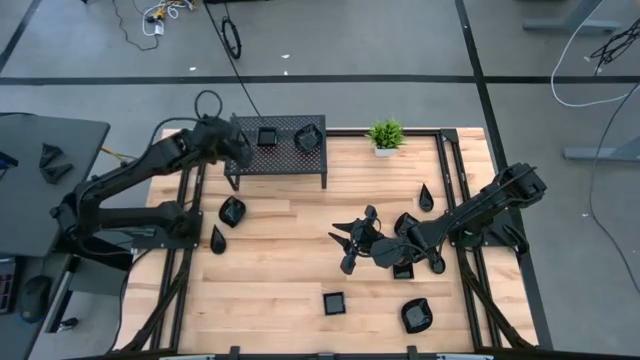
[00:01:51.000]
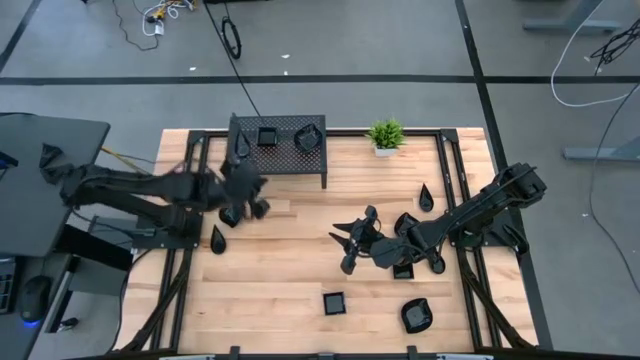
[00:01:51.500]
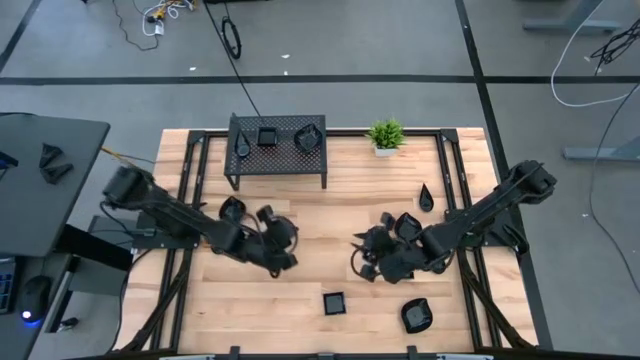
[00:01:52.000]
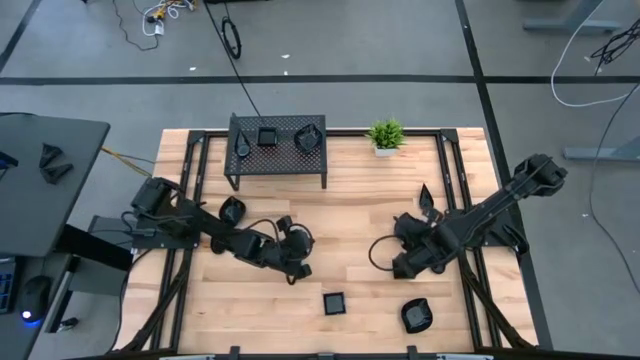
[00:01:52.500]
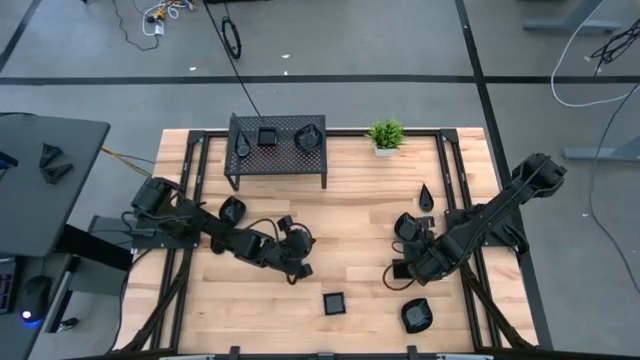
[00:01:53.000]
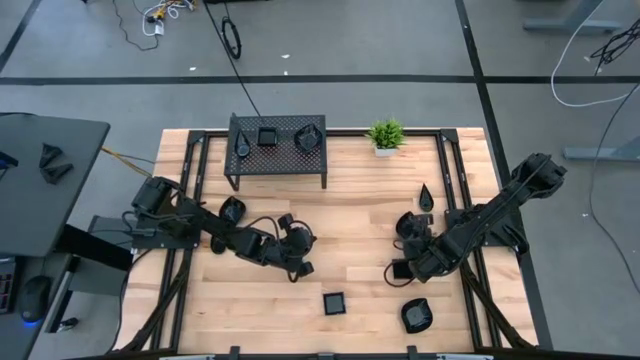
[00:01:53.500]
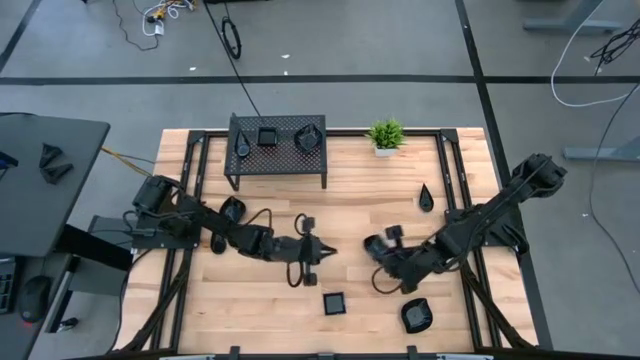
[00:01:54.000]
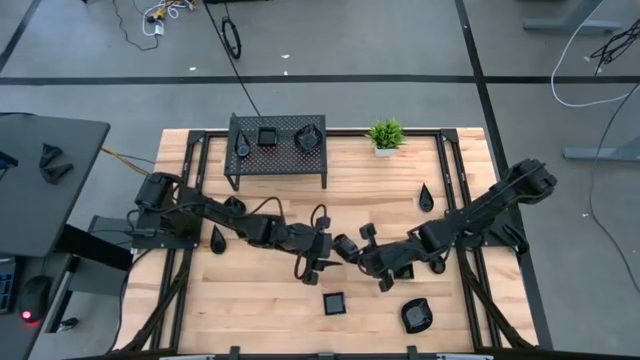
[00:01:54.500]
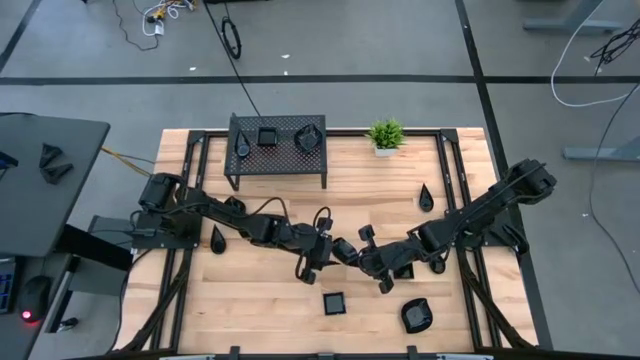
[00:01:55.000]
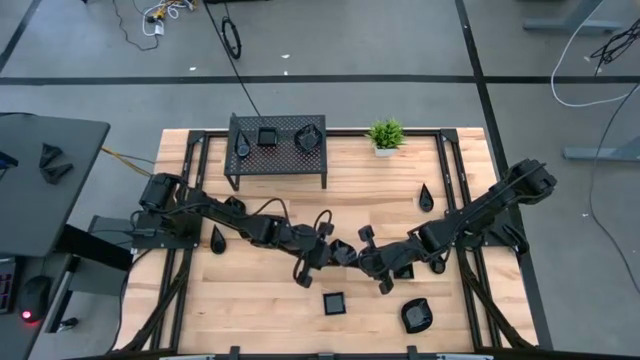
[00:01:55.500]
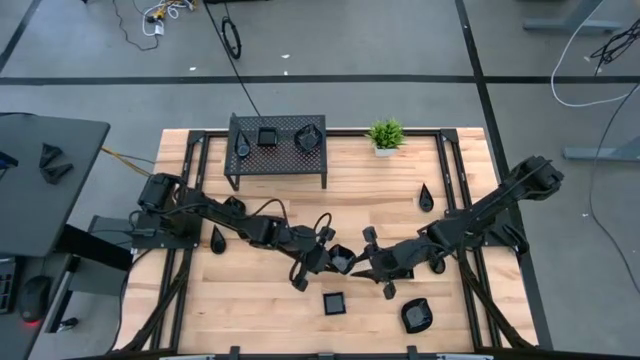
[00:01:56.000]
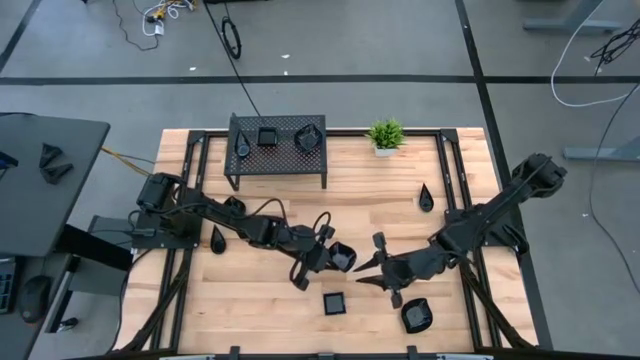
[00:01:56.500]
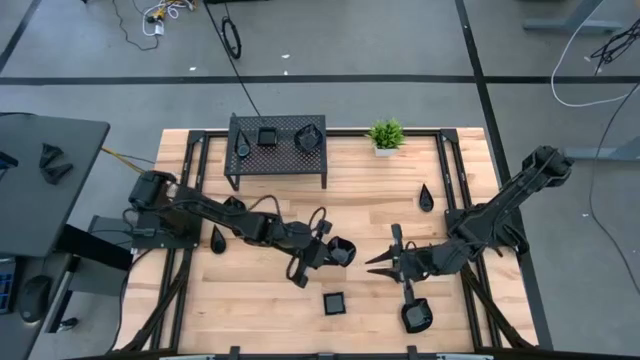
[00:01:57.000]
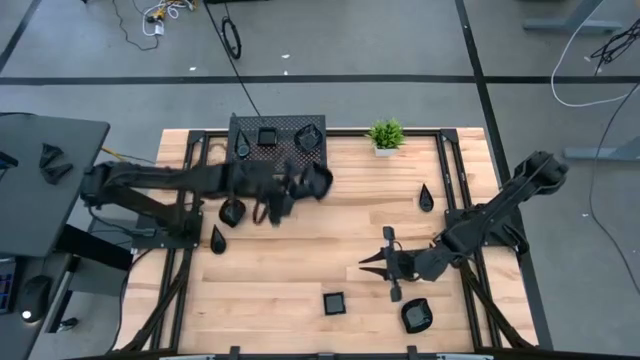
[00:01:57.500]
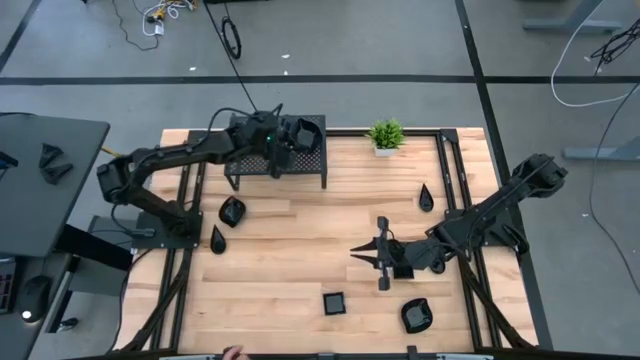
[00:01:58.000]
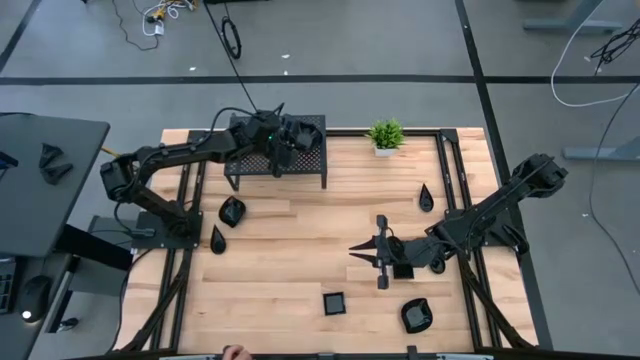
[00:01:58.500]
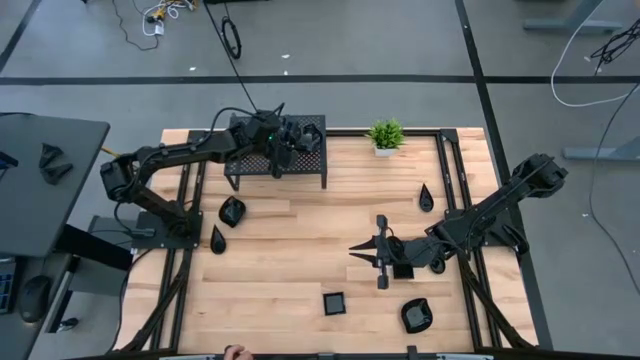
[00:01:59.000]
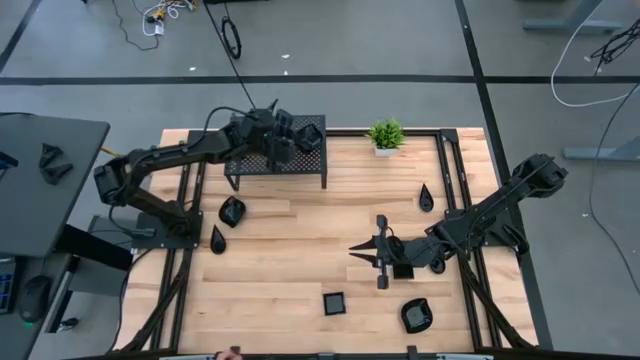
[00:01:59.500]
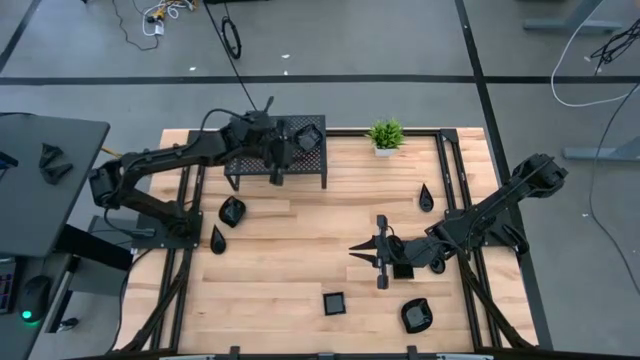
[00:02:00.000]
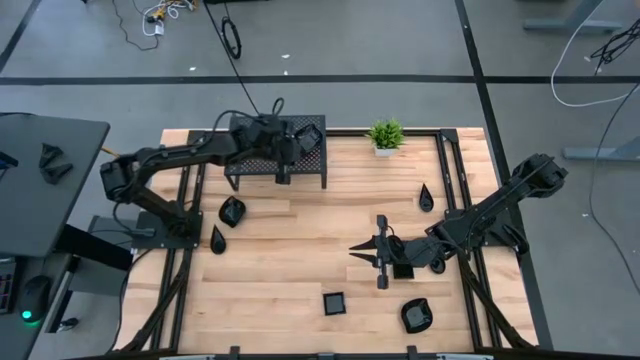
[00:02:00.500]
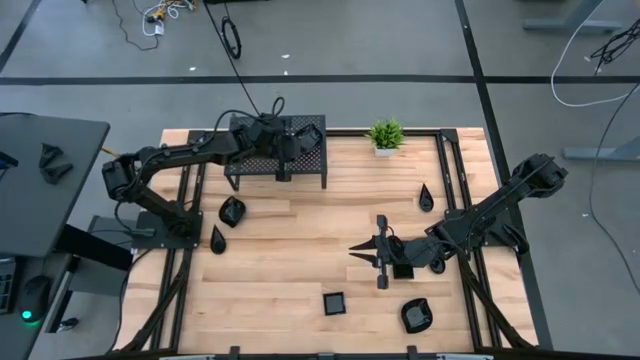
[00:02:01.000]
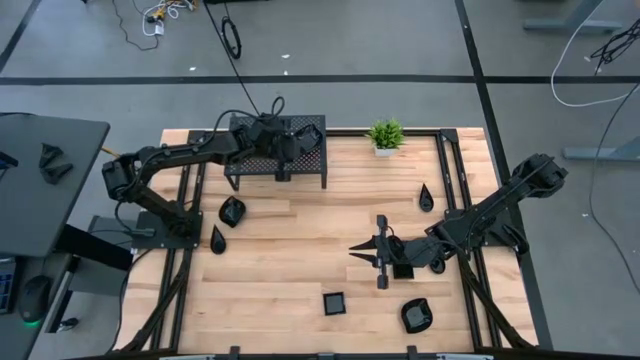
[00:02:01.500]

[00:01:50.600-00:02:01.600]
Task: Pick & Place Mini shaped plates
Stack the black leaf shaped plate on top of the black leaf shaped plates on the shelf

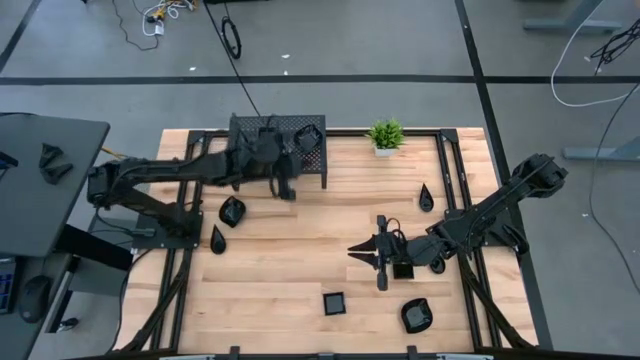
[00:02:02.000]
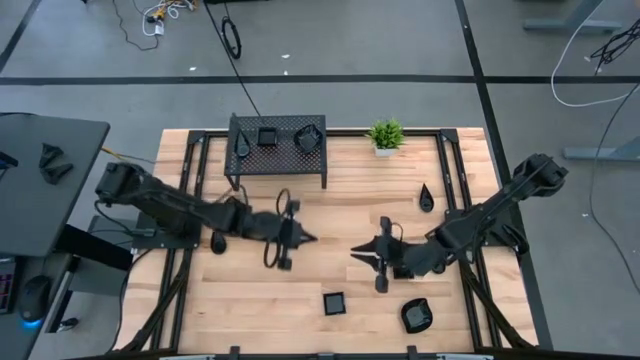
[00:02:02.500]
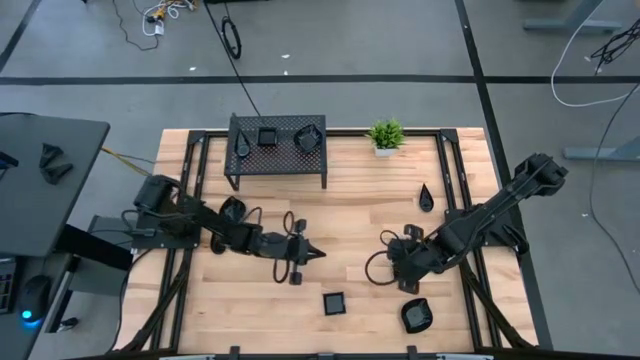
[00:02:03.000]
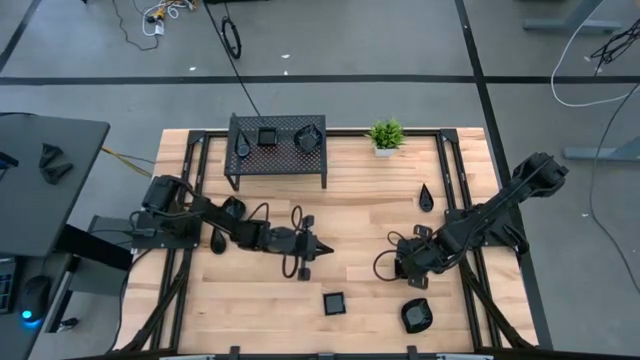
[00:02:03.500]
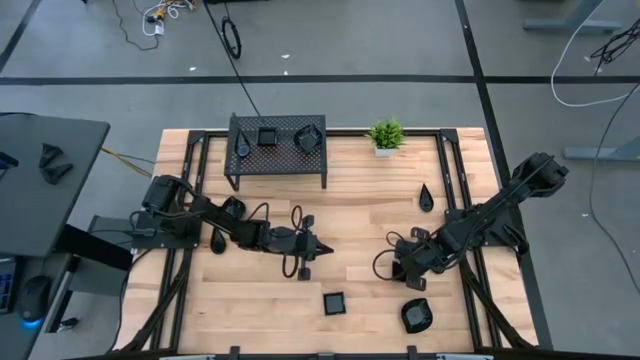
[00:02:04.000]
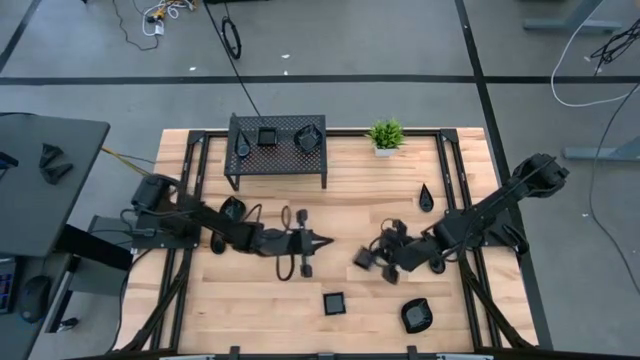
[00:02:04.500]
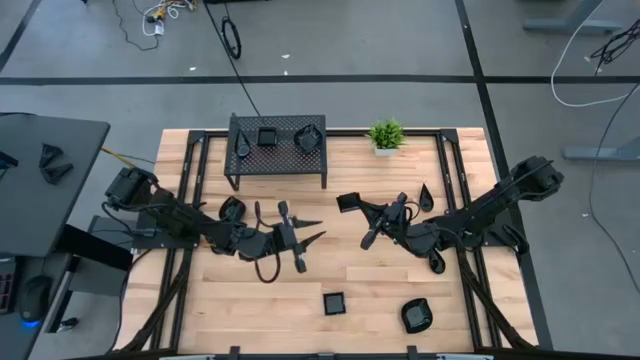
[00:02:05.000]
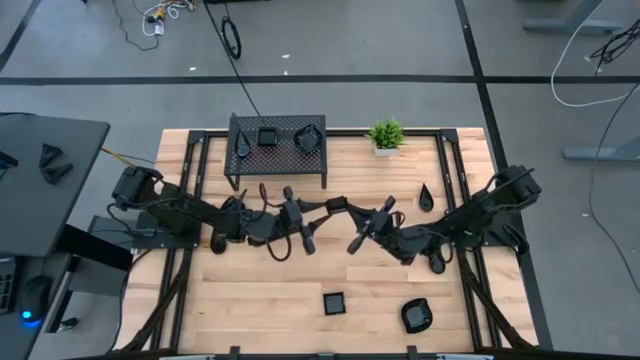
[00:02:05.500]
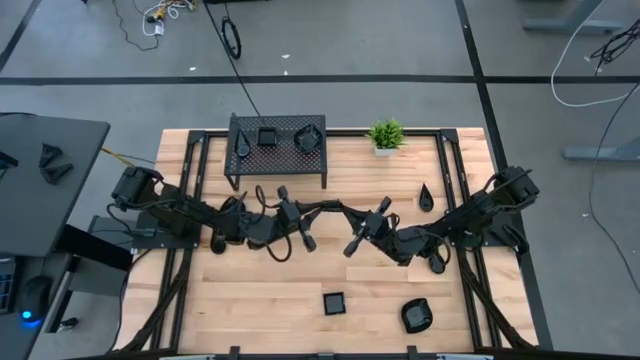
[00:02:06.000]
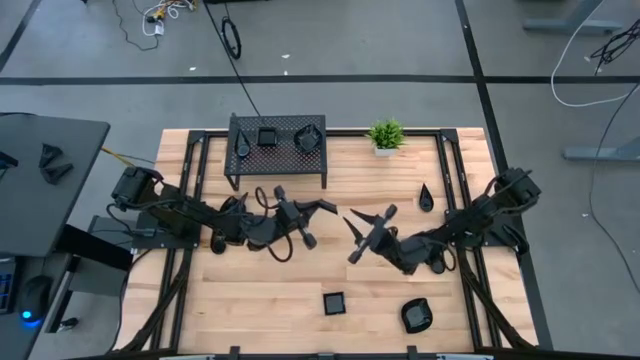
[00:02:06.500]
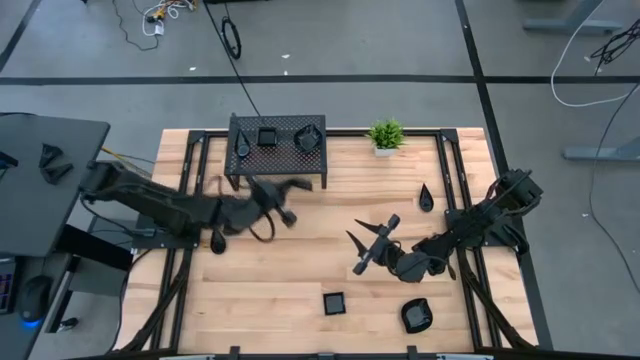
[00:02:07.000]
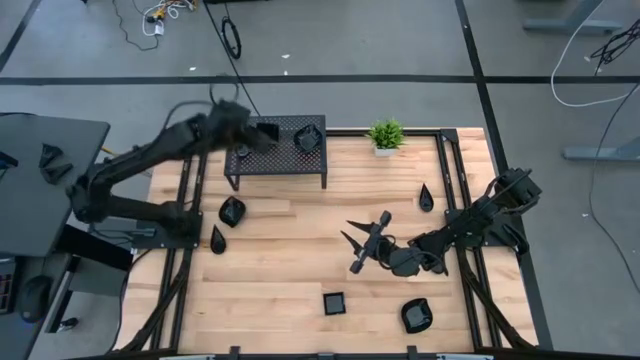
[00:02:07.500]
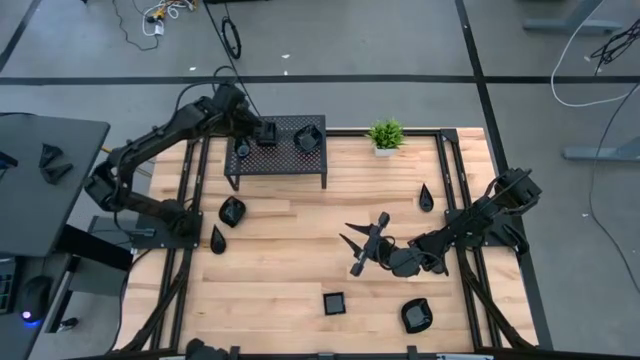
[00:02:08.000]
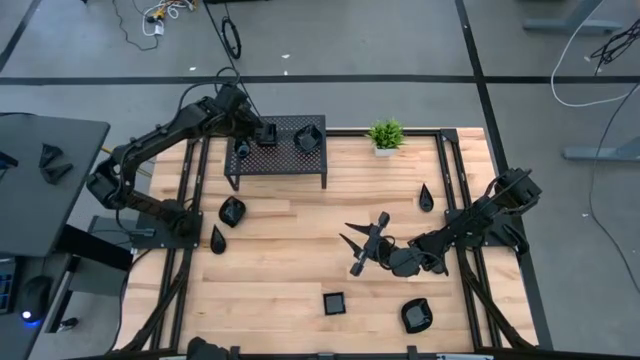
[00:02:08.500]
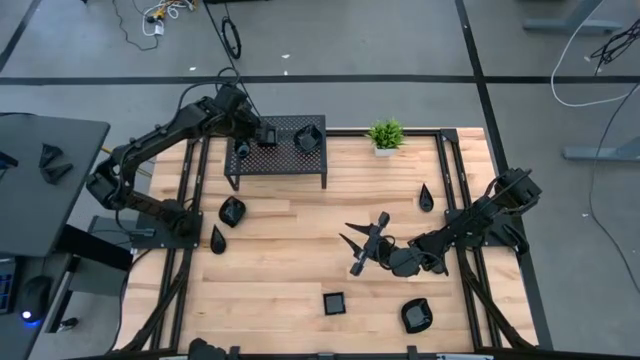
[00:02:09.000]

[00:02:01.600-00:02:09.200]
Stack the black square plate on top of the black square plates on the shelf
